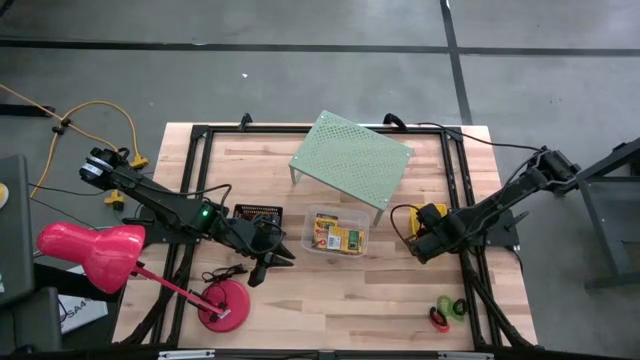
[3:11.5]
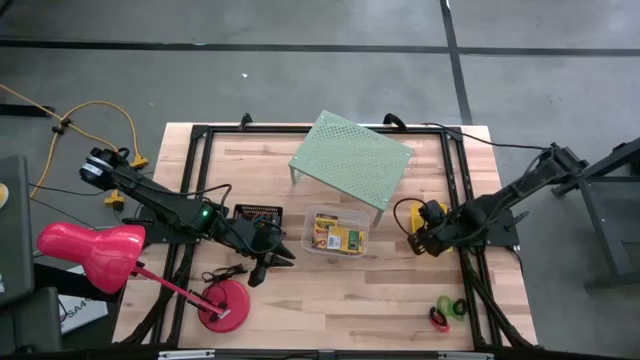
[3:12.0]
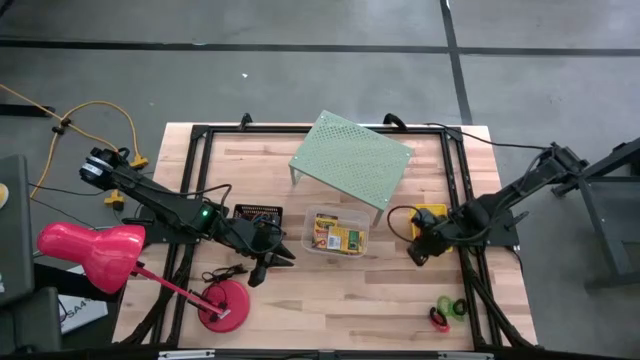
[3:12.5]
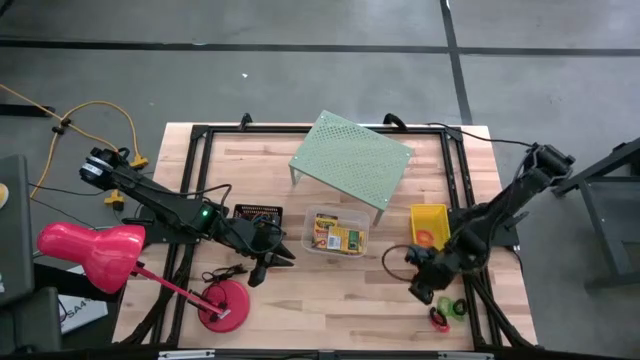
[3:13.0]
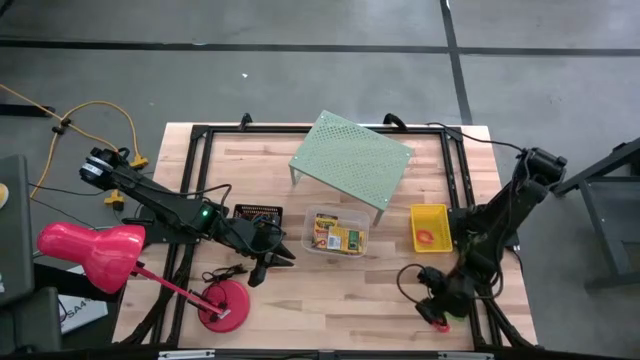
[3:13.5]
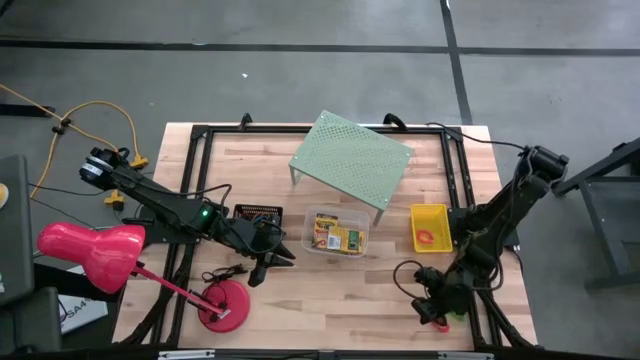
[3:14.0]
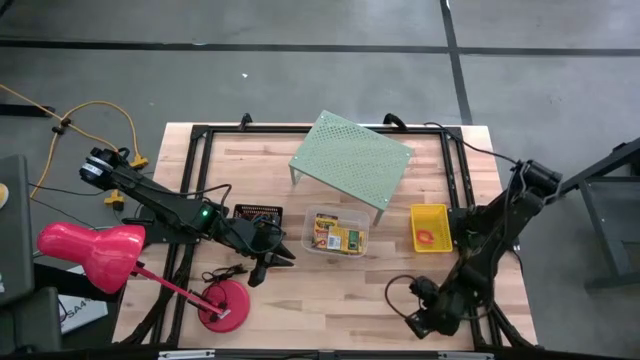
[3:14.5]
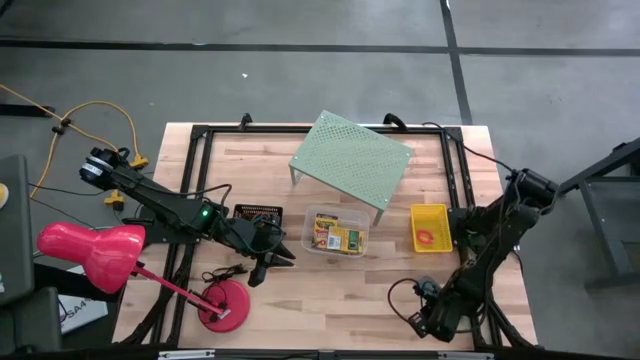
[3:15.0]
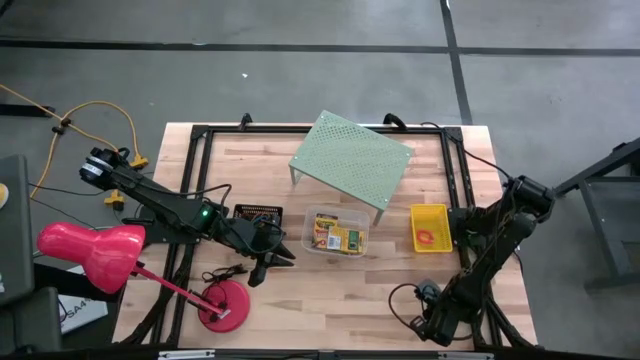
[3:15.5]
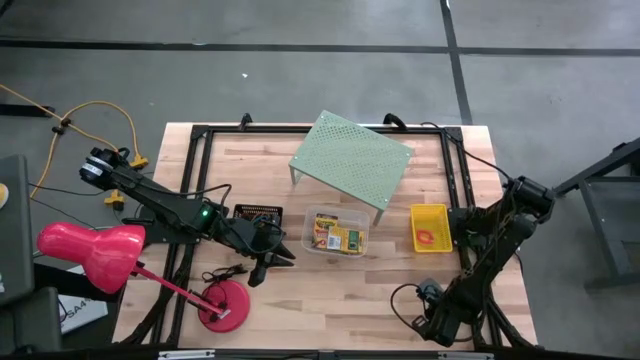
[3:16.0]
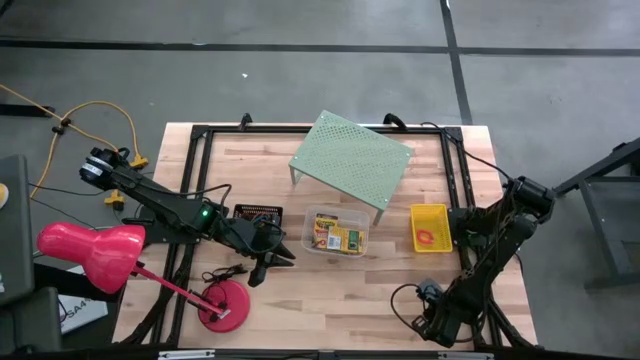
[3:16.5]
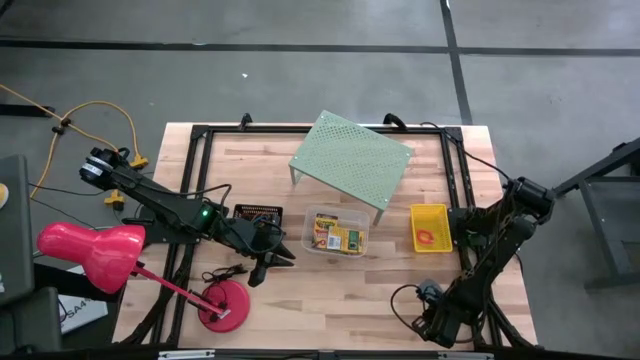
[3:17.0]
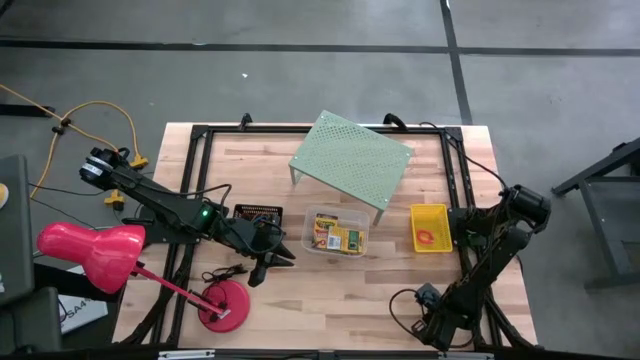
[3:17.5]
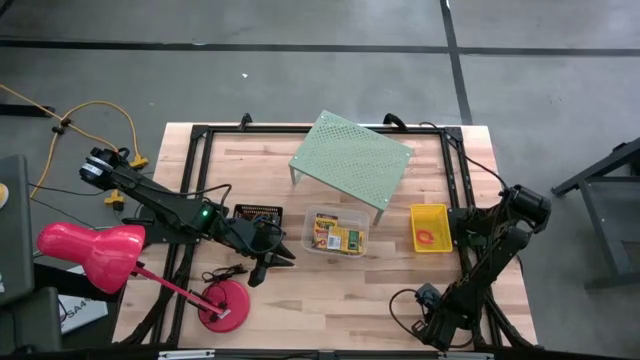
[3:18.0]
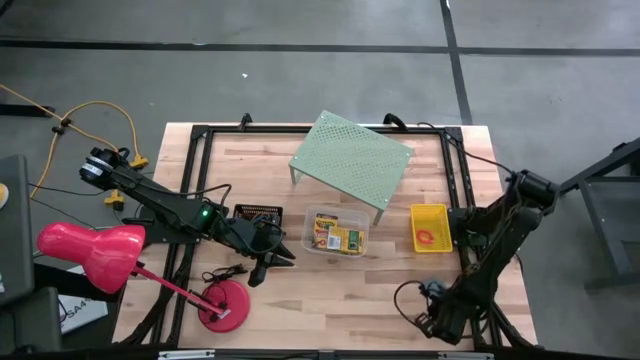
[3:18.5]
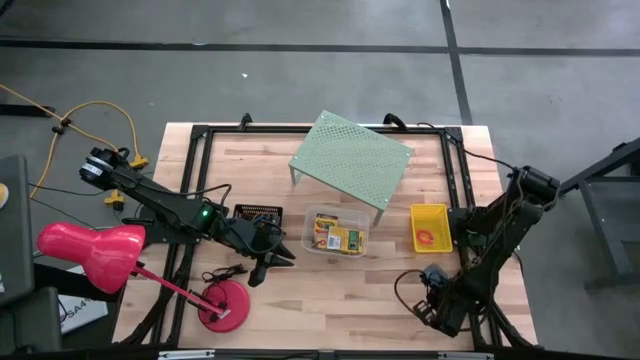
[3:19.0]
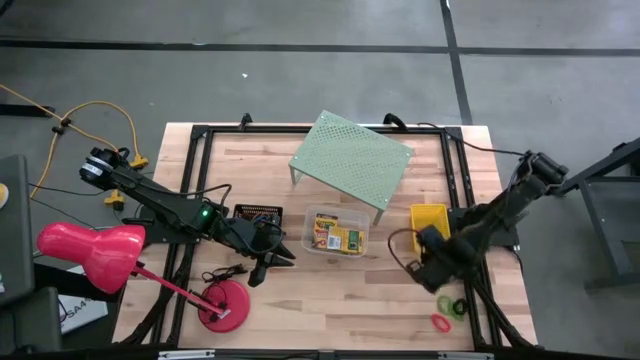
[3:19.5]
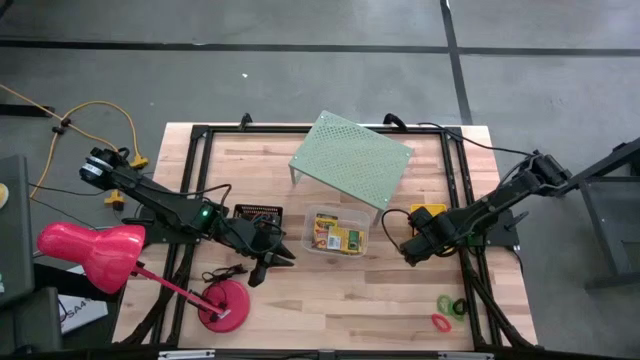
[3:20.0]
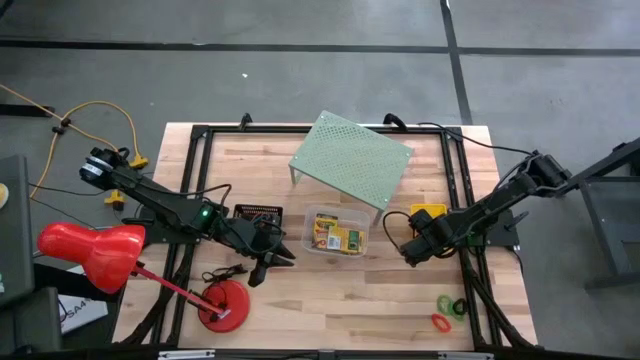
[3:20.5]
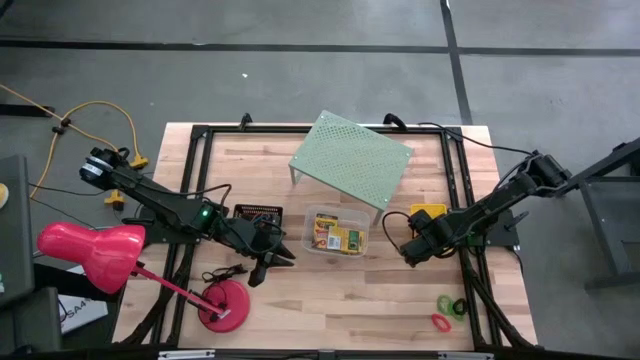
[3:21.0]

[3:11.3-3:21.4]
Task: Pick & Place Office Desk Supplies
Put the left black spring keychain into the yellow bin

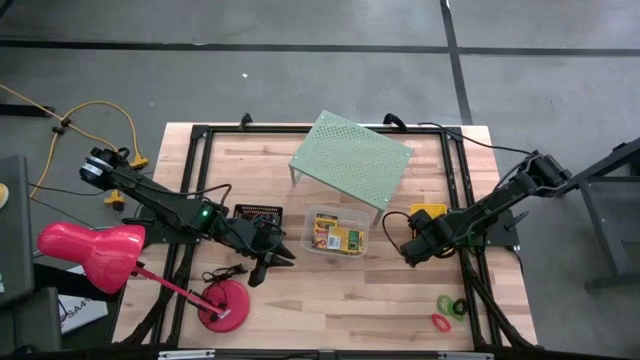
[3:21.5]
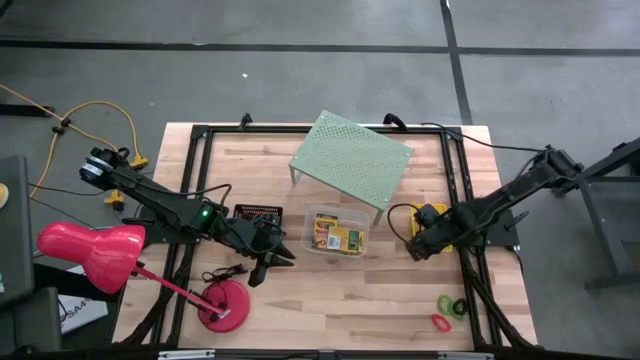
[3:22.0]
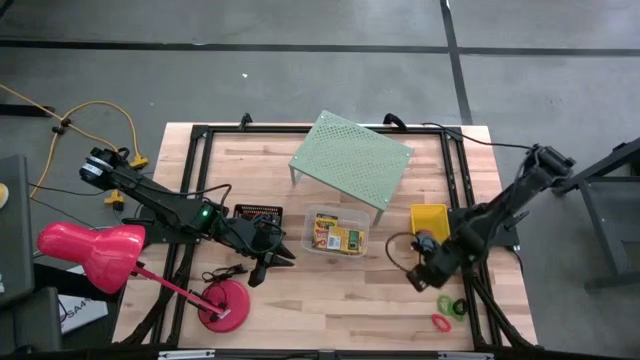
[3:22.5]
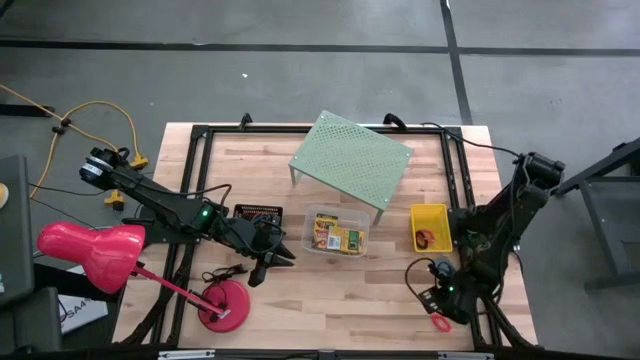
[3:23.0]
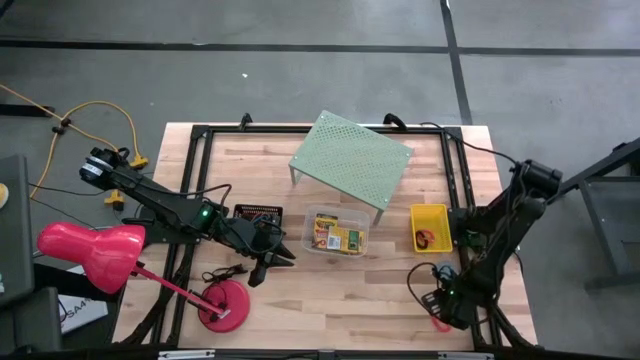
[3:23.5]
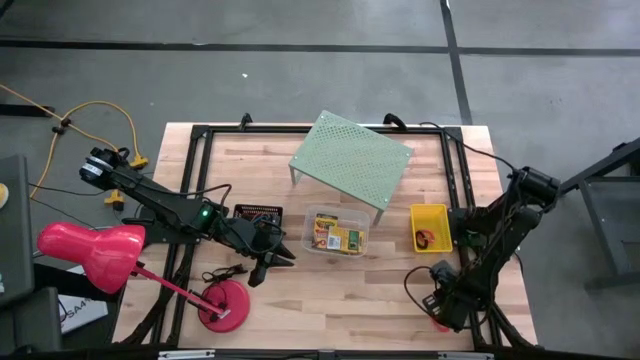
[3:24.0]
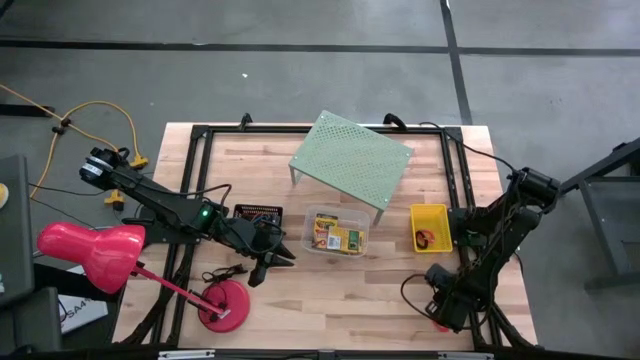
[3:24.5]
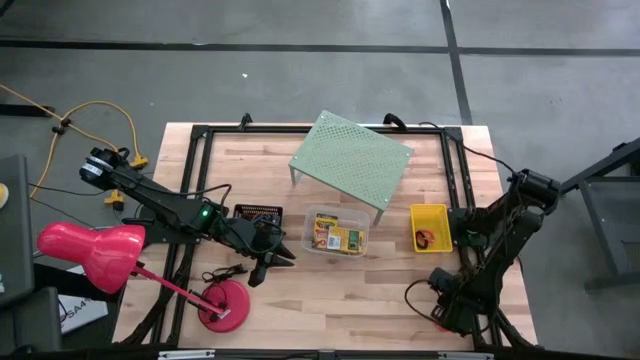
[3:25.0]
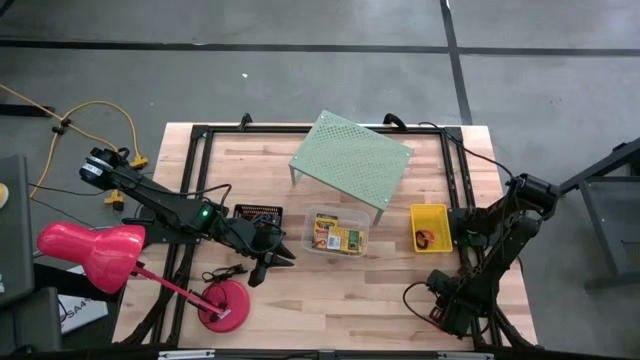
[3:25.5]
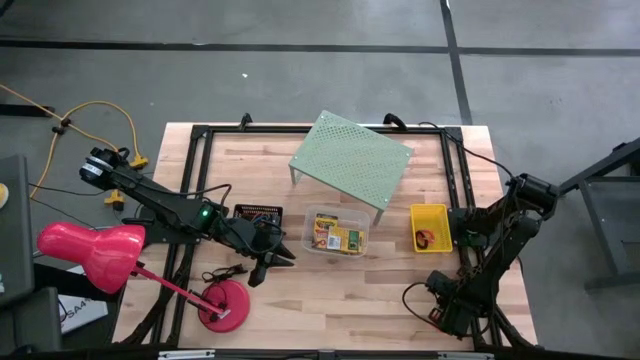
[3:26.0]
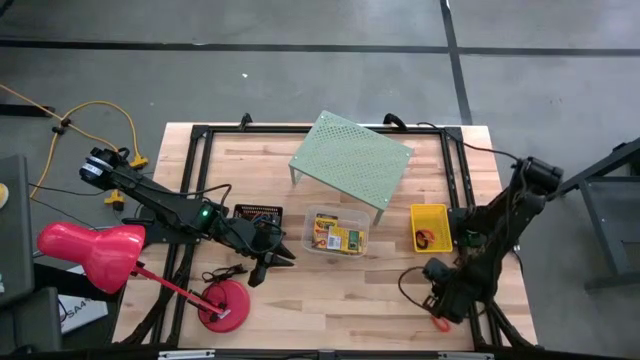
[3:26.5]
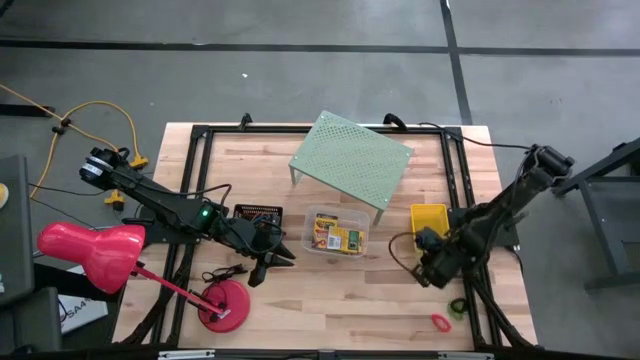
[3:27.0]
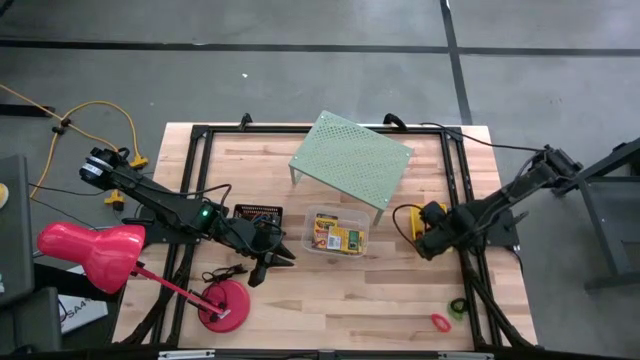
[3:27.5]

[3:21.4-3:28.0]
Put the left green spring keychain into the yellow bin

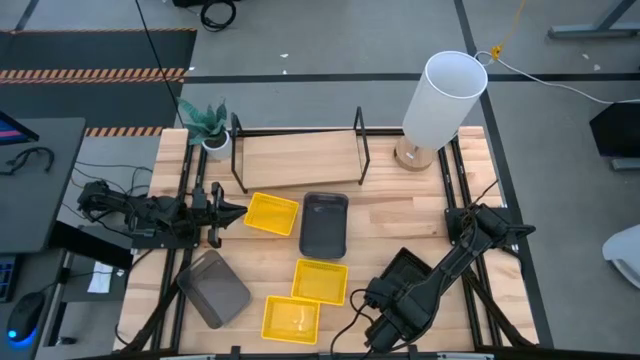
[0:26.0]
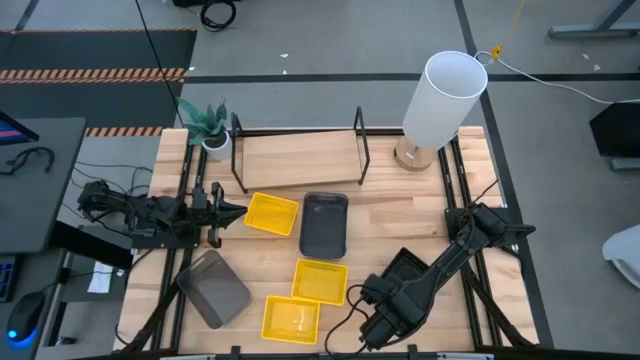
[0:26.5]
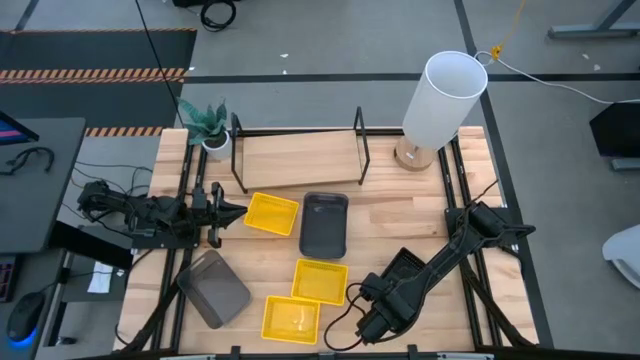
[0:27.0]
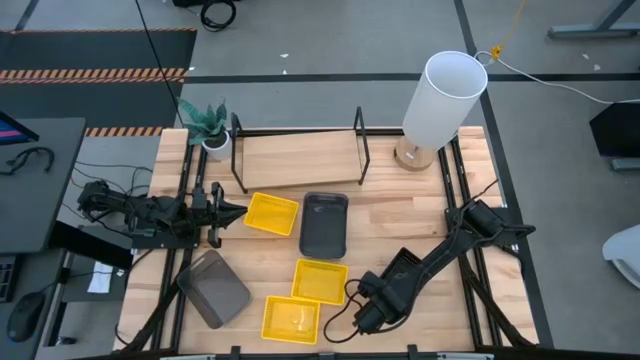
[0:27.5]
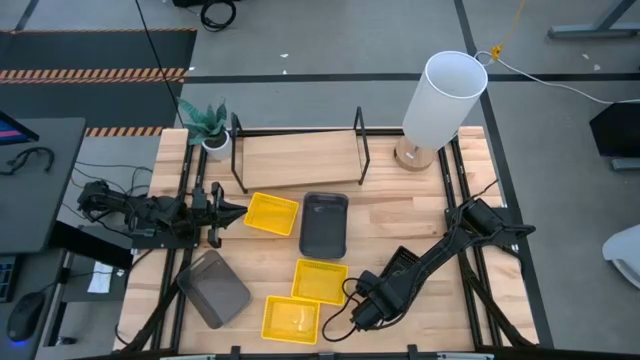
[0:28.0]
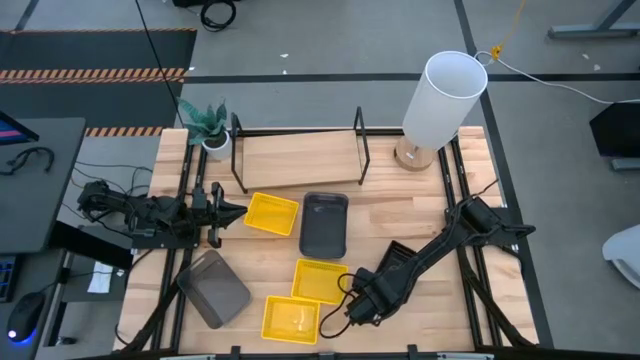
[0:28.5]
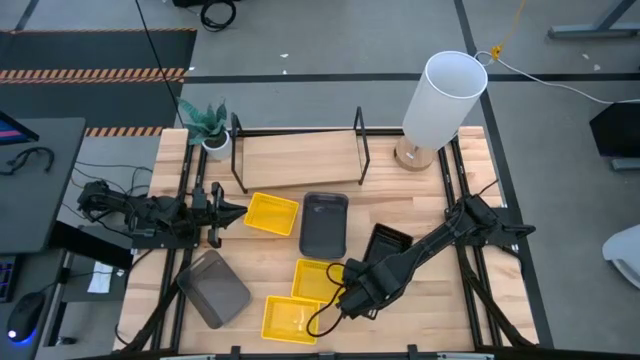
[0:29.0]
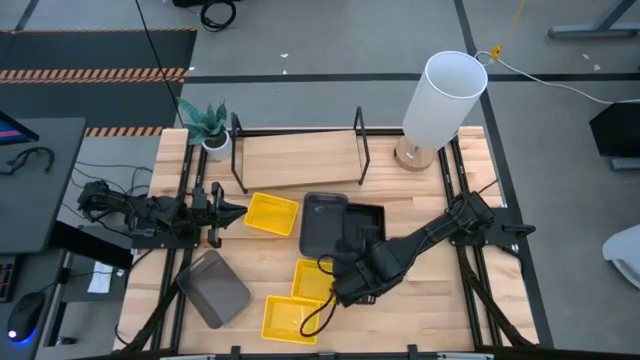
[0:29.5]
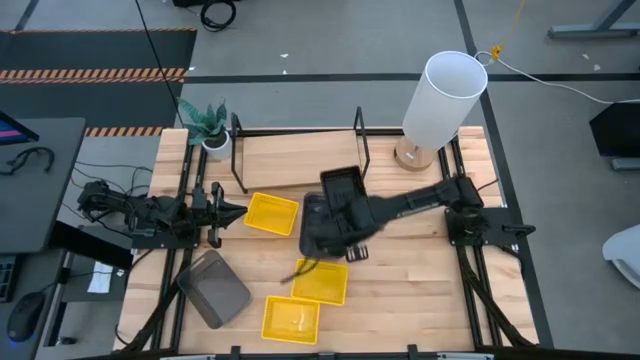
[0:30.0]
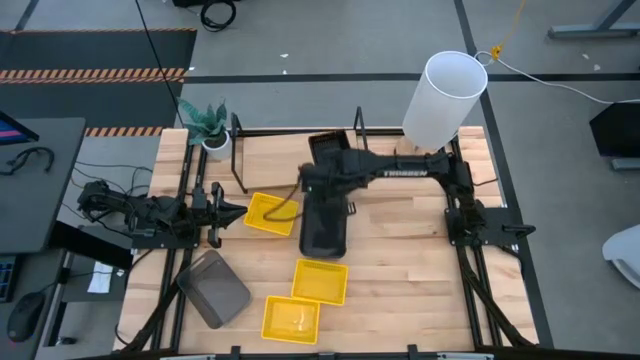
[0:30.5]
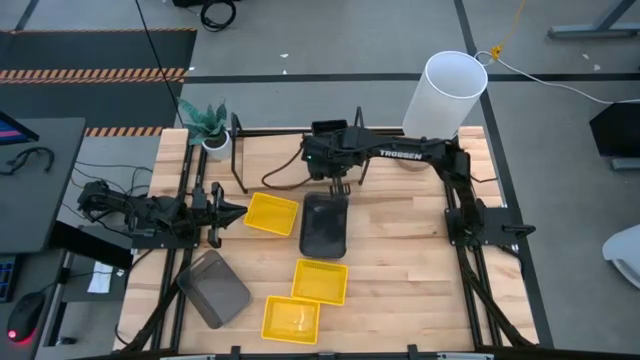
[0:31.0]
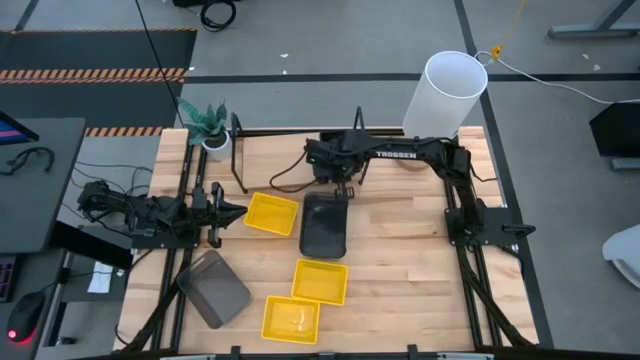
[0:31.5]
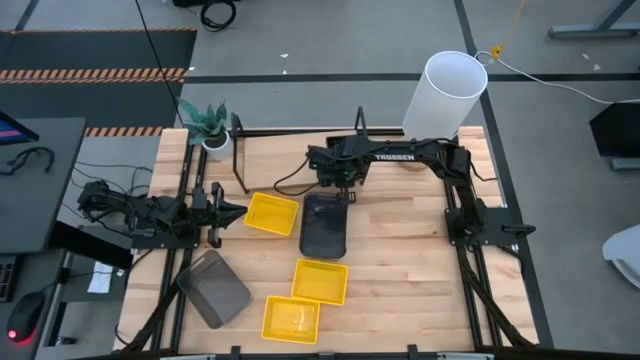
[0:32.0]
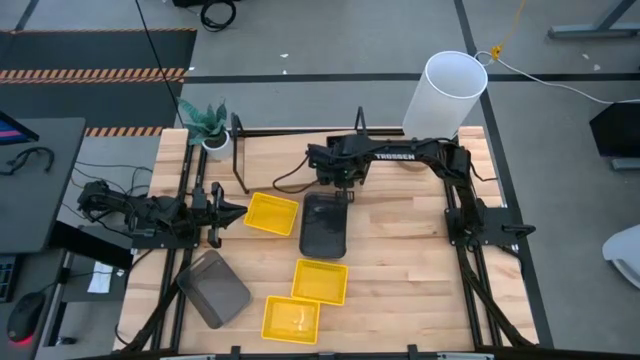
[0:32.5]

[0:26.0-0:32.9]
Task: Stack baskets on shelf by color
Put the stacked black bins on the shelf
